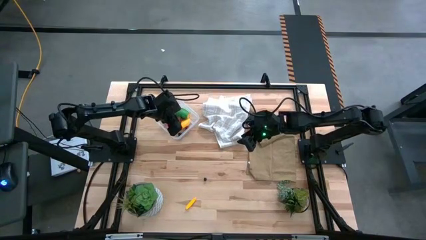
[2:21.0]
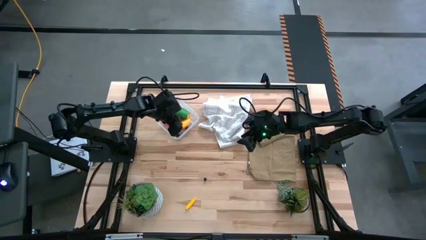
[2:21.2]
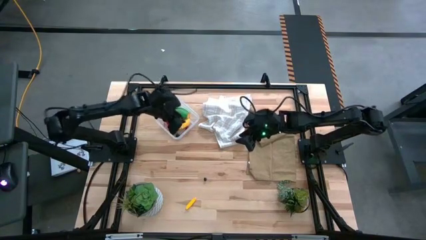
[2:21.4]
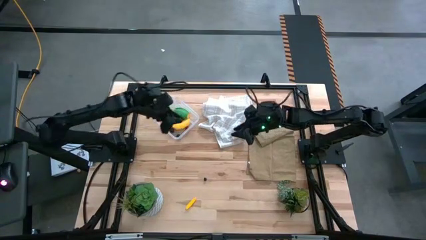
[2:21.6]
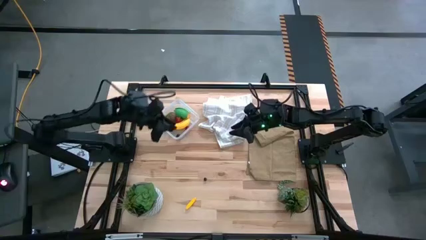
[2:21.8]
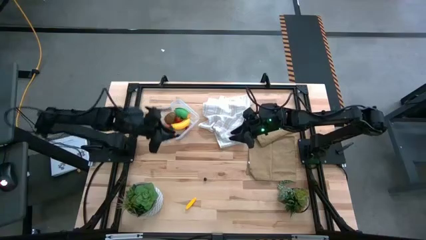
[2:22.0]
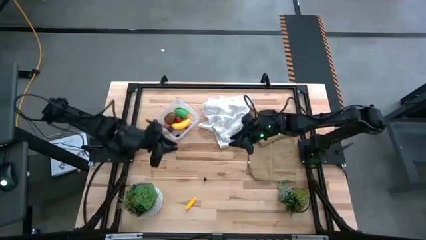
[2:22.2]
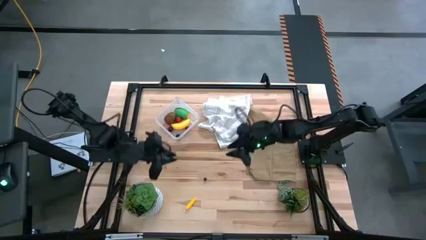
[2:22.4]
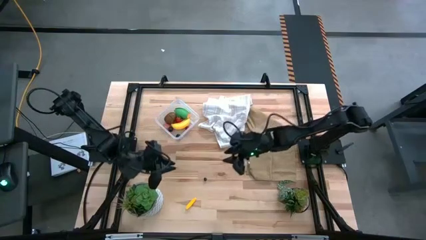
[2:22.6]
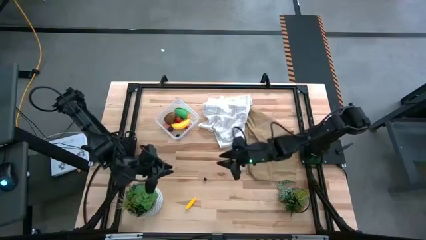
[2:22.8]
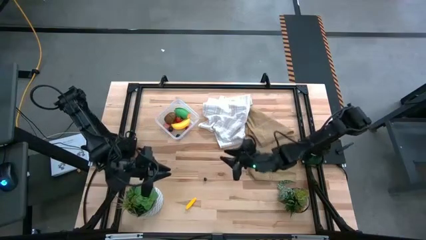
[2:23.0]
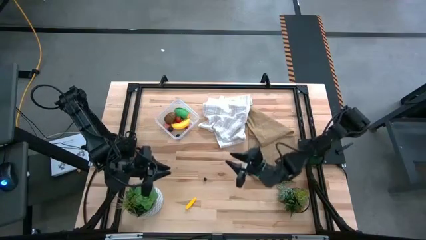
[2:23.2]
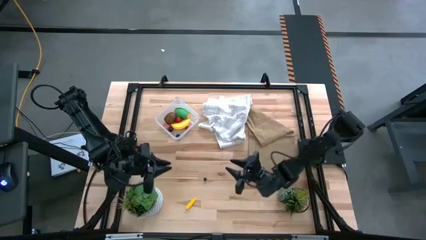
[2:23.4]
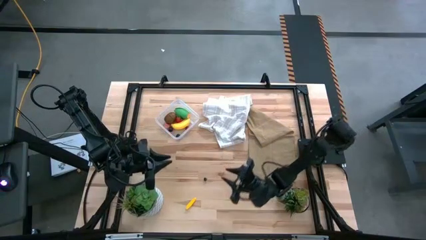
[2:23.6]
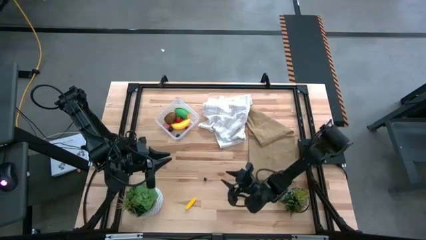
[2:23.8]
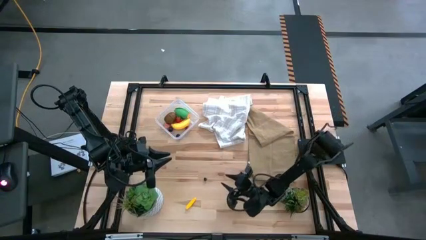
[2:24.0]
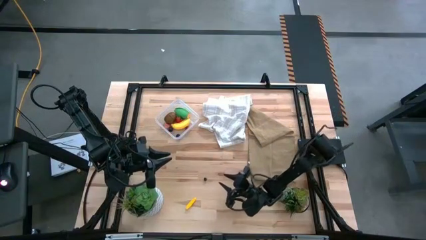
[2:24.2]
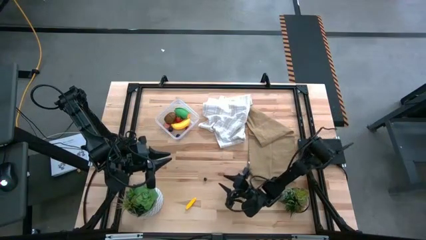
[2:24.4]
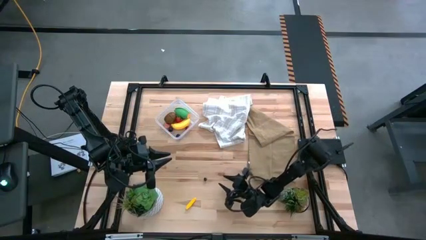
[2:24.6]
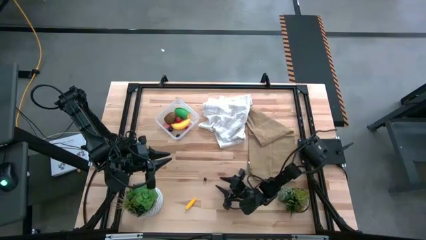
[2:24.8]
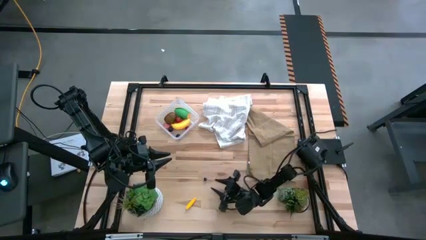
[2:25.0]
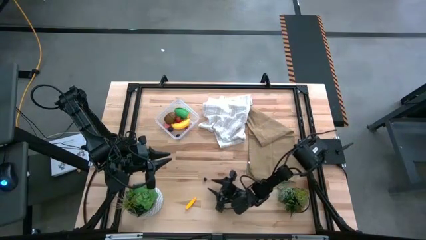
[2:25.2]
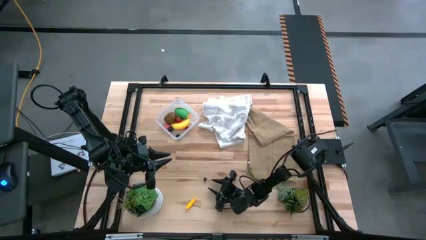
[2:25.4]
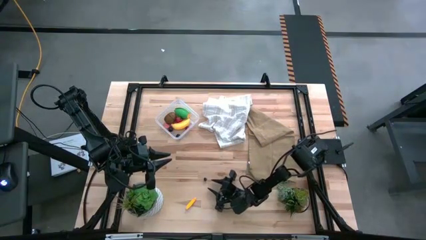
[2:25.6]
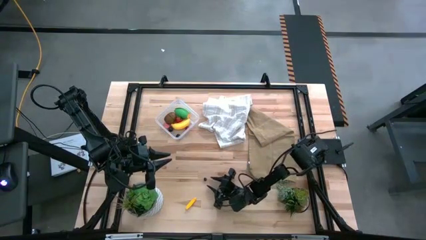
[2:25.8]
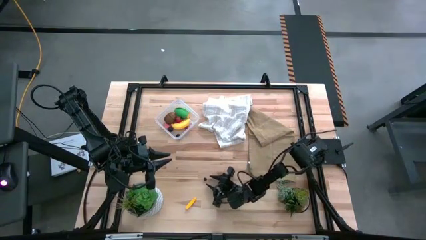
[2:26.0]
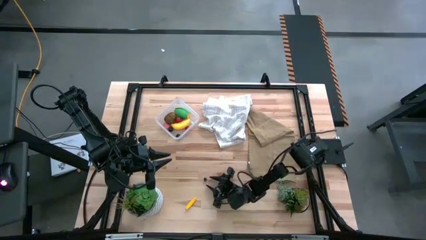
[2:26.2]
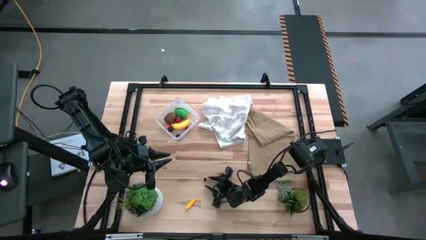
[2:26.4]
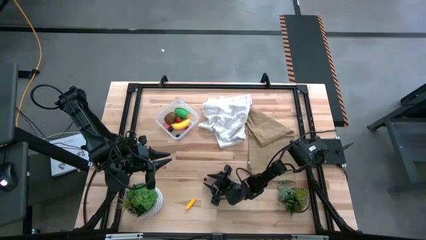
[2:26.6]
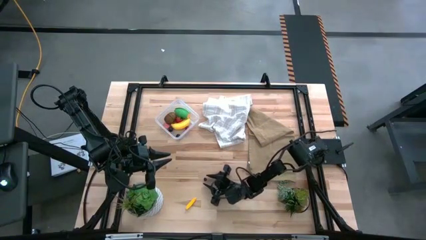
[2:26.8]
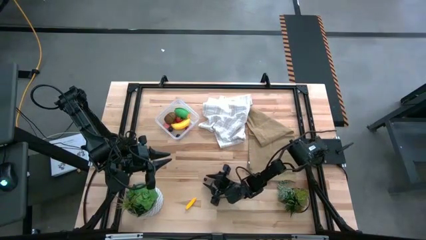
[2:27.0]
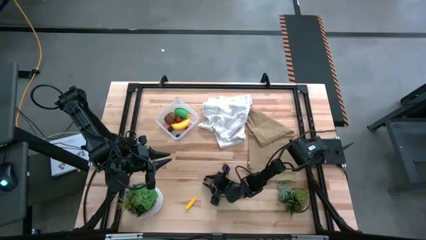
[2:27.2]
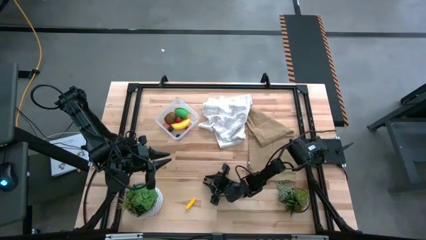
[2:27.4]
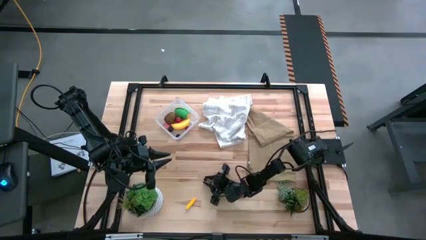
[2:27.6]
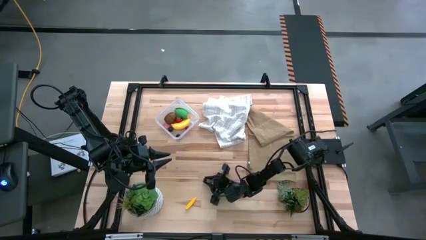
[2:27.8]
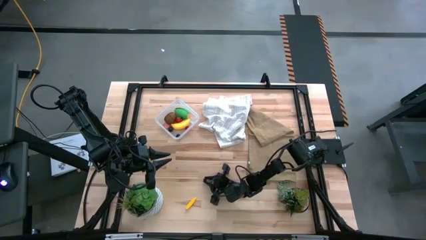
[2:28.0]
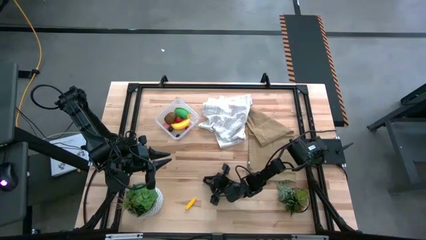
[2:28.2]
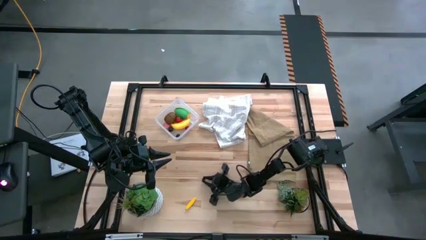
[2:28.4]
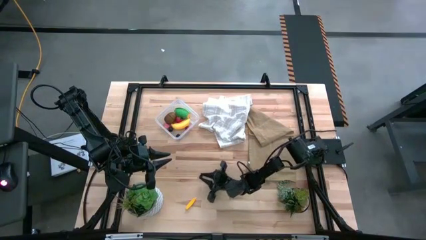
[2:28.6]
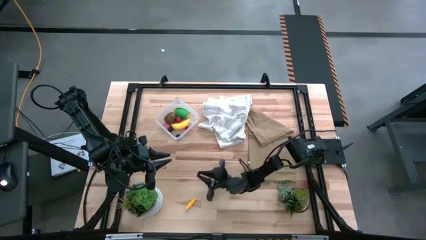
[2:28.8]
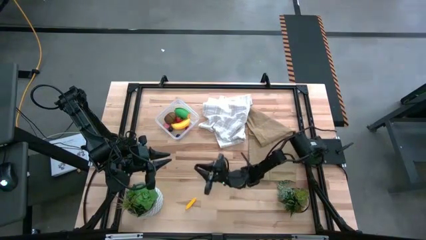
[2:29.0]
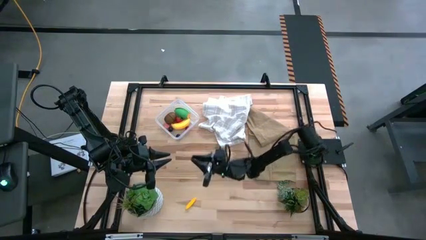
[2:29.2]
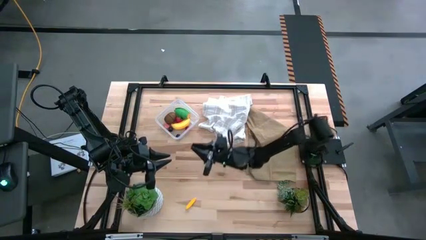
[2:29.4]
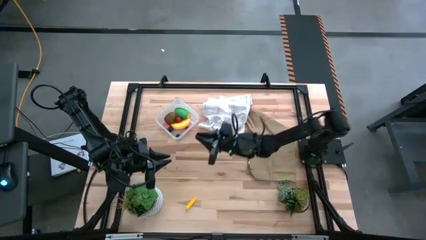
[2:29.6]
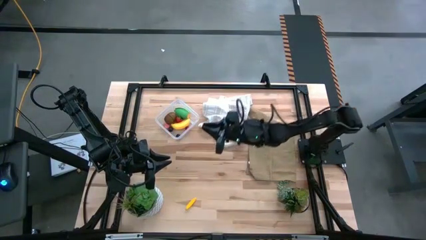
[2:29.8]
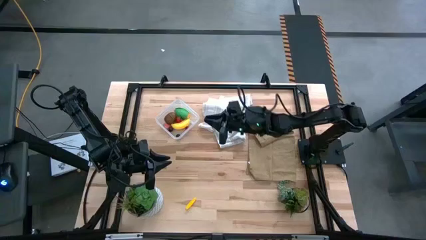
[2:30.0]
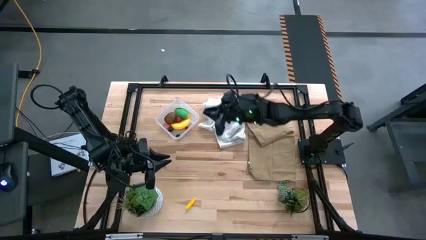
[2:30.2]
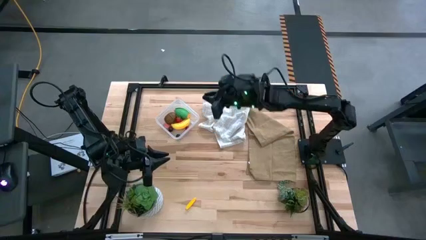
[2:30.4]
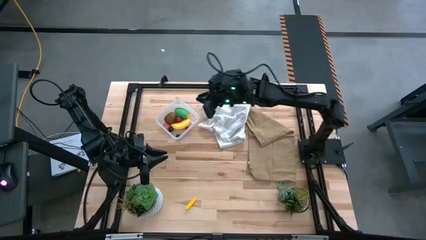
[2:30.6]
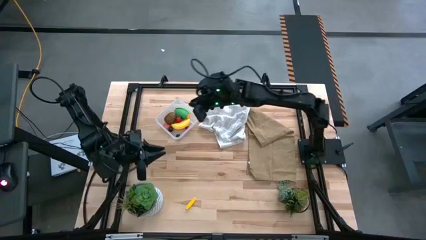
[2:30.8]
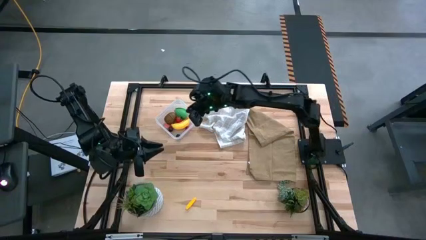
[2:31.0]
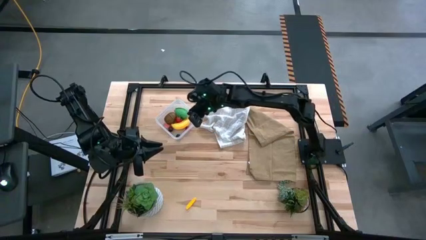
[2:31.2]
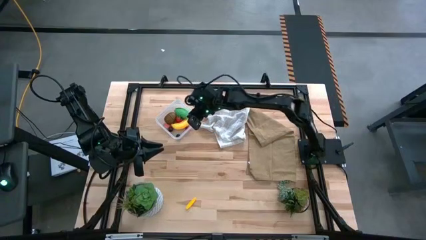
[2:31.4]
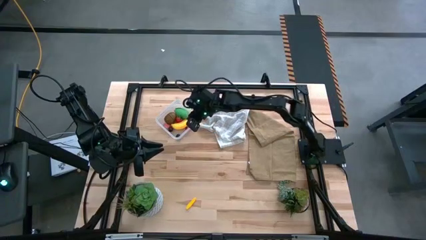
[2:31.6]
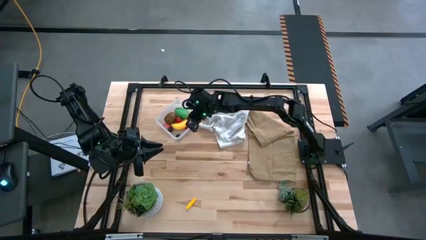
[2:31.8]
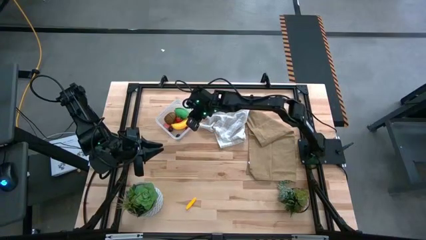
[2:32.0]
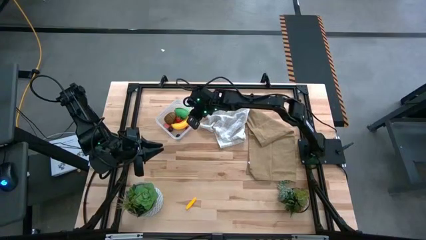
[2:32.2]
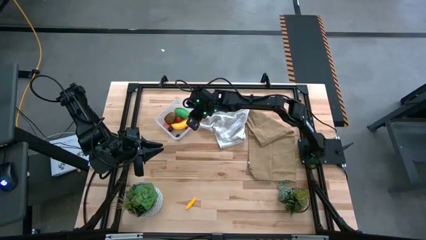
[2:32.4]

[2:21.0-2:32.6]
Task: Pick and placing Produce into tupperware
Put the blue blueberry into the transparent bin

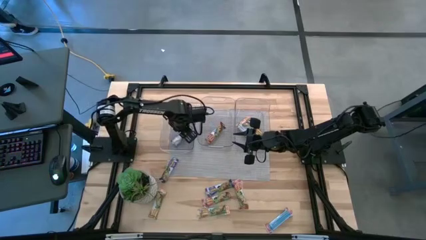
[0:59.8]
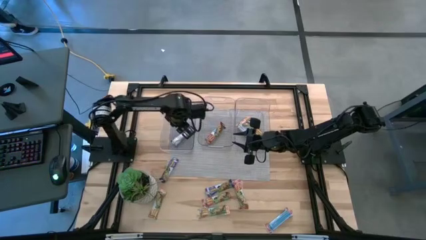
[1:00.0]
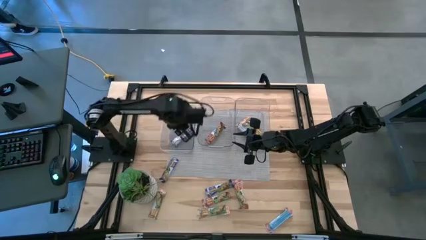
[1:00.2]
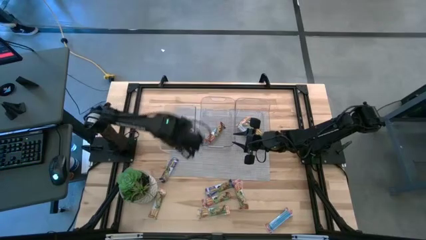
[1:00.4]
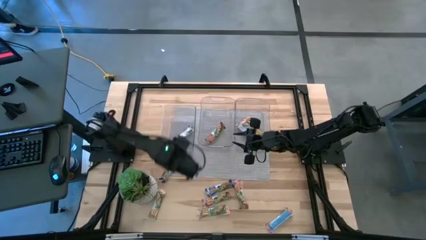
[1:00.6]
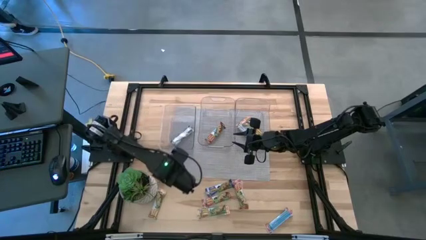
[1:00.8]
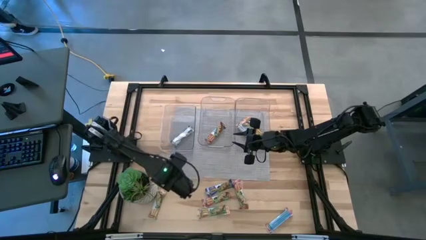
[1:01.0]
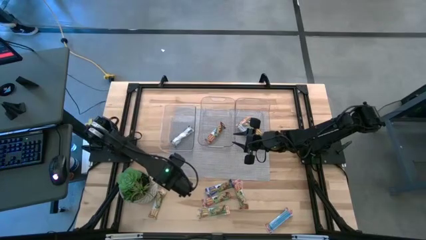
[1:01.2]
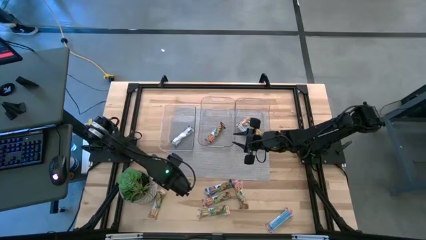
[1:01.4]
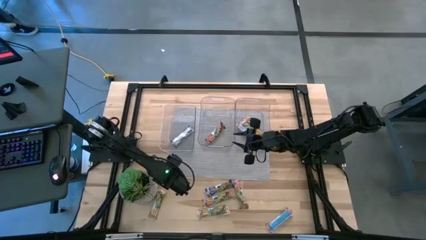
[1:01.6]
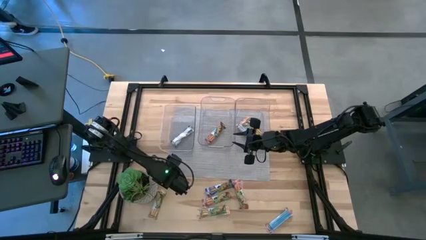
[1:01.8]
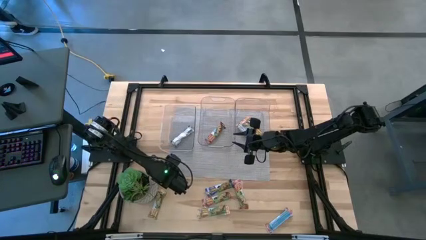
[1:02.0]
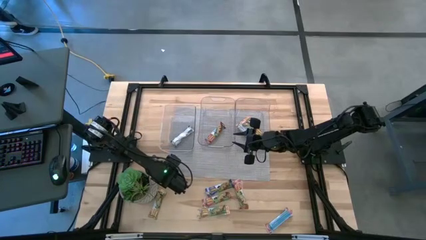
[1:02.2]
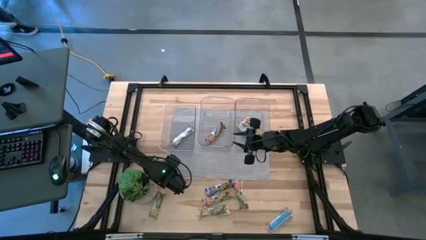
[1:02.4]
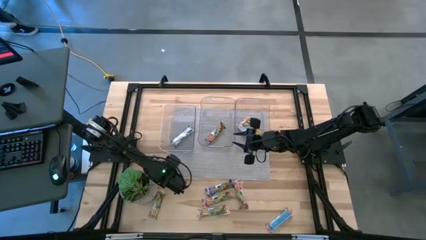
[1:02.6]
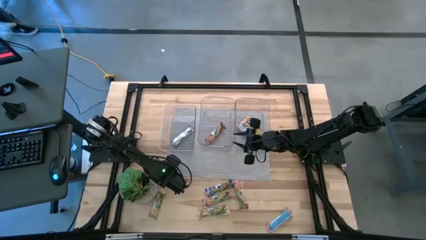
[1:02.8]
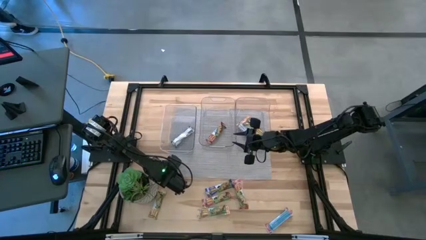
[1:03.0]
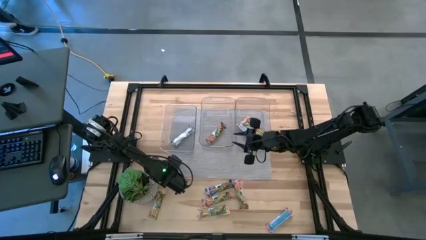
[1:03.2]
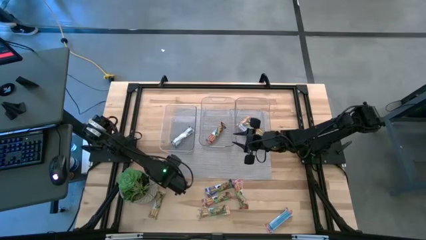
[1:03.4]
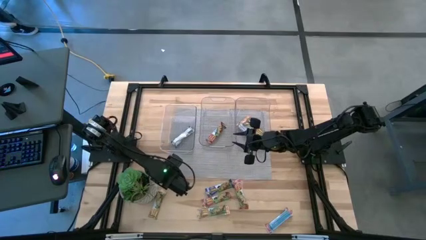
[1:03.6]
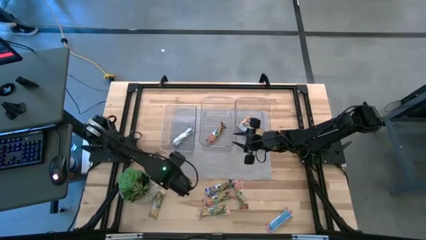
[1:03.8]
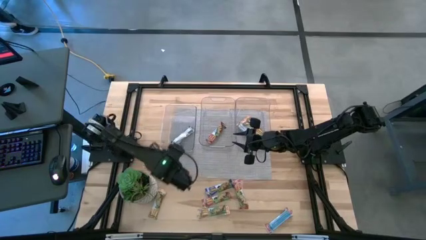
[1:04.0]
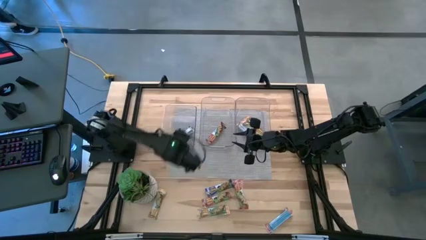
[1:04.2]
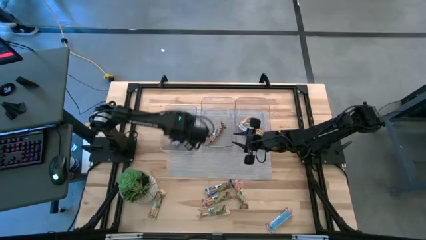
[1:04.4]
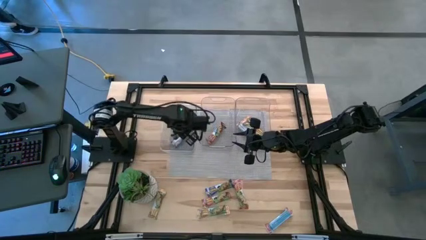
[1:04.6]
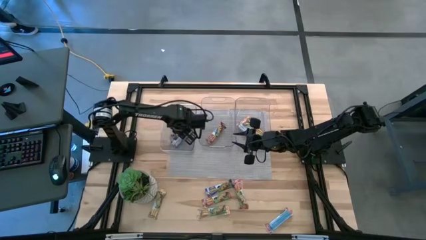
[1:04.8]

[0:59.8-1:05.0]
Task: Pick and place Granola Bars by type
Put the blue granola bar into the left transparent bin
